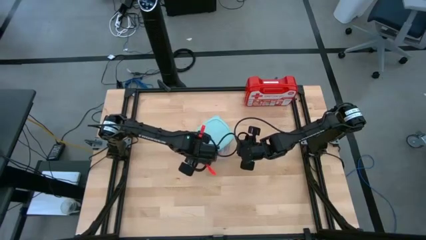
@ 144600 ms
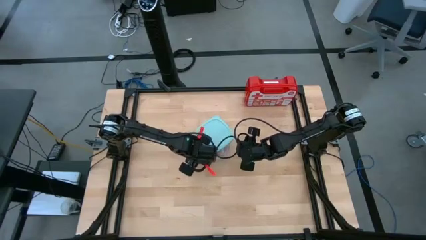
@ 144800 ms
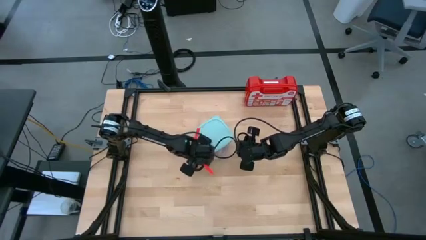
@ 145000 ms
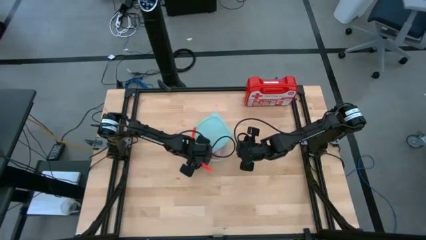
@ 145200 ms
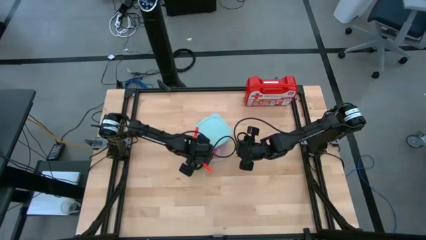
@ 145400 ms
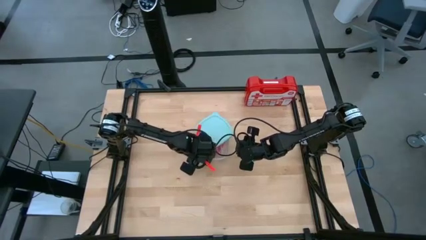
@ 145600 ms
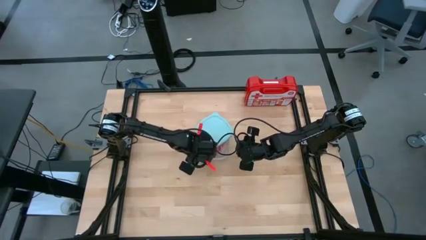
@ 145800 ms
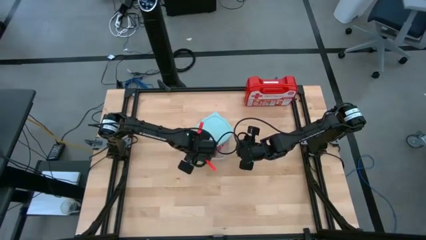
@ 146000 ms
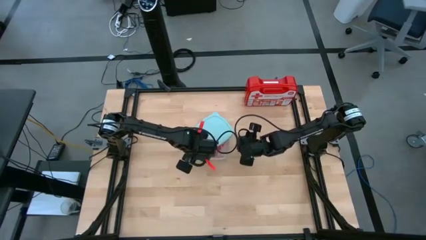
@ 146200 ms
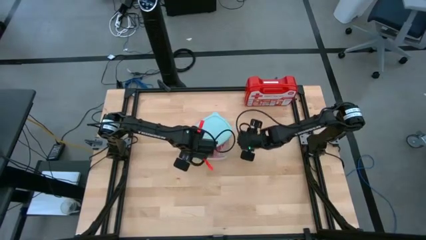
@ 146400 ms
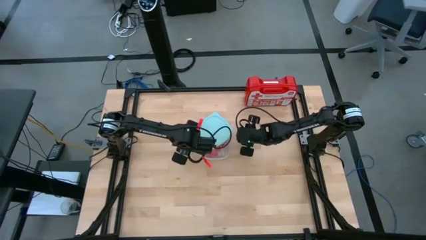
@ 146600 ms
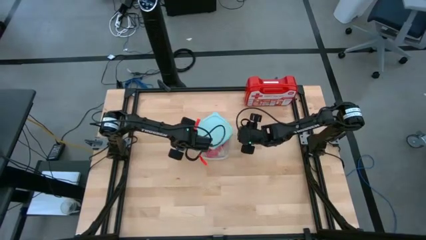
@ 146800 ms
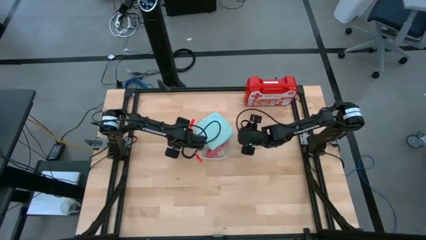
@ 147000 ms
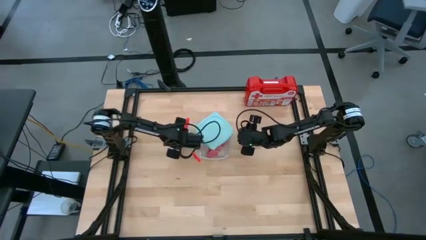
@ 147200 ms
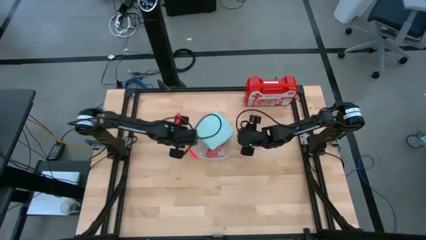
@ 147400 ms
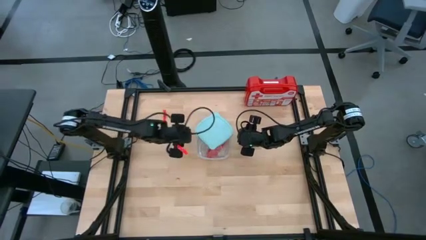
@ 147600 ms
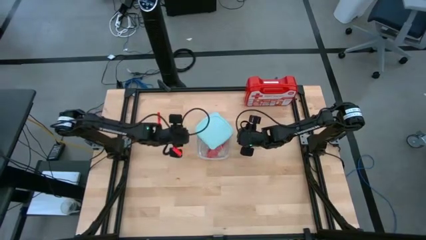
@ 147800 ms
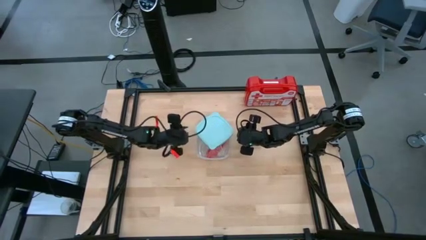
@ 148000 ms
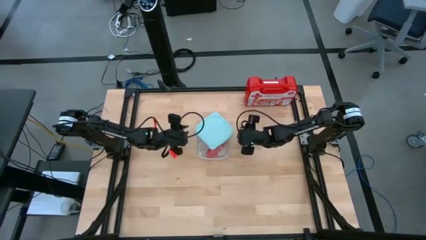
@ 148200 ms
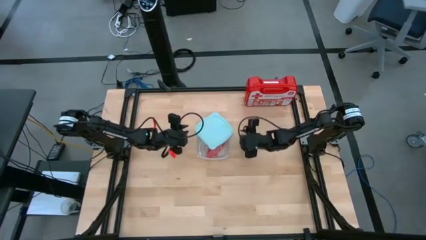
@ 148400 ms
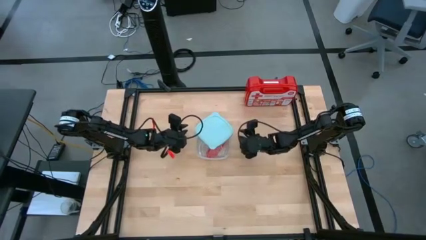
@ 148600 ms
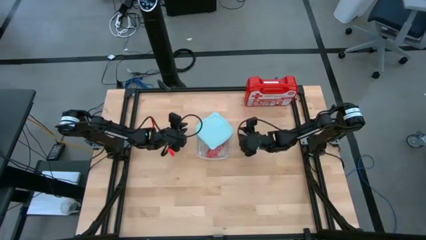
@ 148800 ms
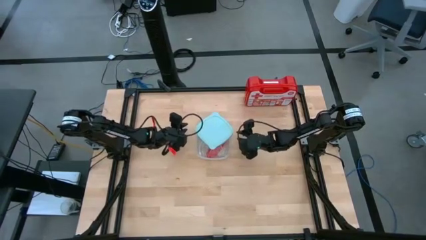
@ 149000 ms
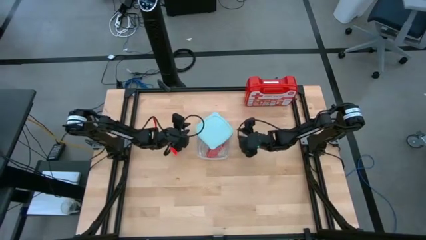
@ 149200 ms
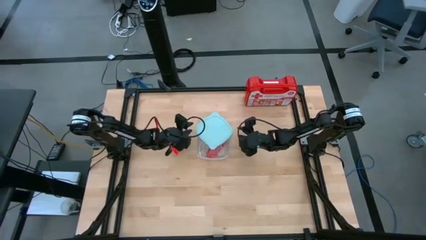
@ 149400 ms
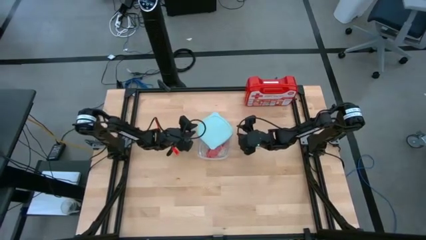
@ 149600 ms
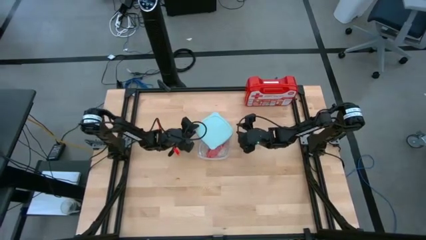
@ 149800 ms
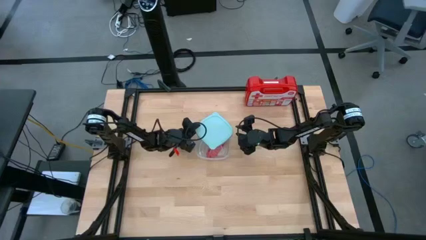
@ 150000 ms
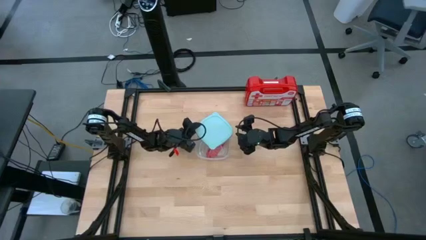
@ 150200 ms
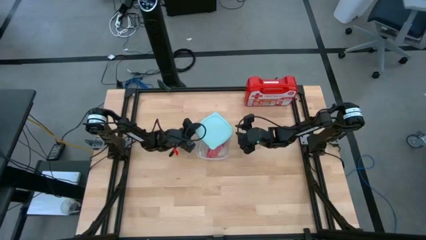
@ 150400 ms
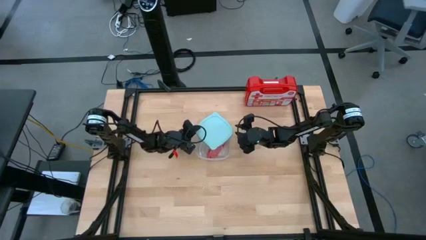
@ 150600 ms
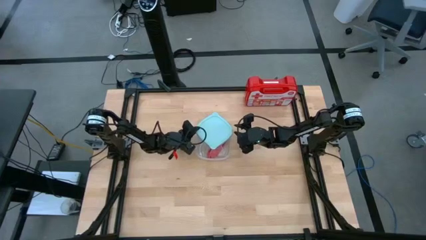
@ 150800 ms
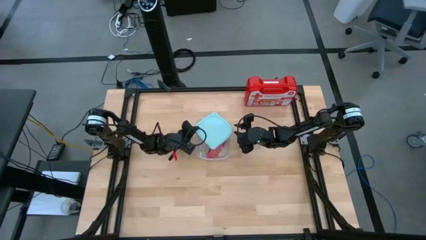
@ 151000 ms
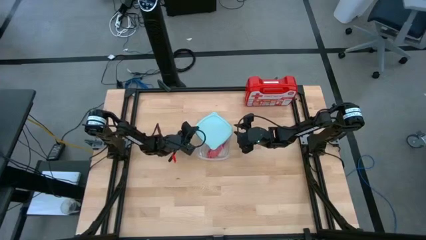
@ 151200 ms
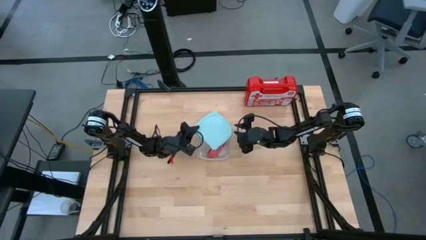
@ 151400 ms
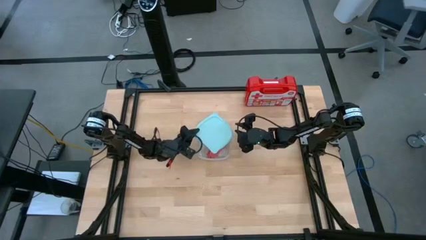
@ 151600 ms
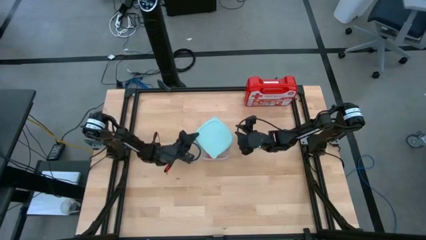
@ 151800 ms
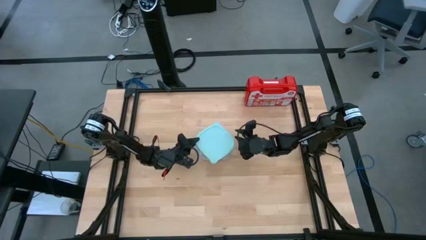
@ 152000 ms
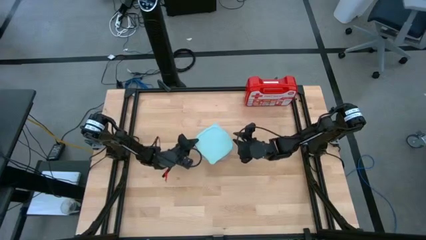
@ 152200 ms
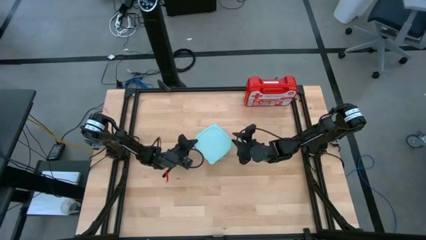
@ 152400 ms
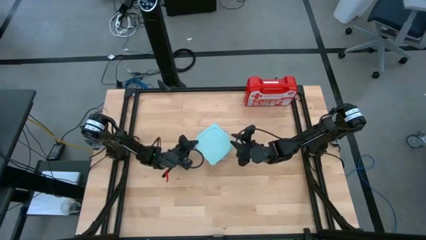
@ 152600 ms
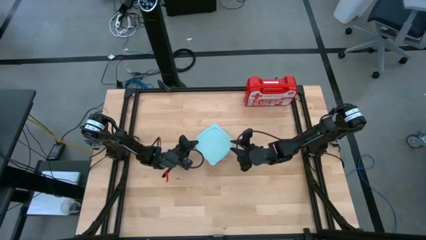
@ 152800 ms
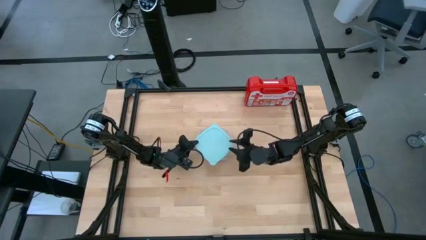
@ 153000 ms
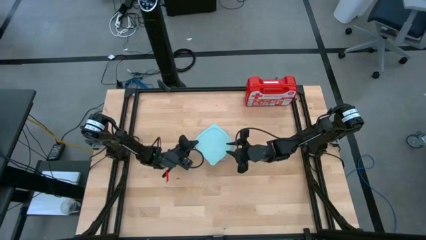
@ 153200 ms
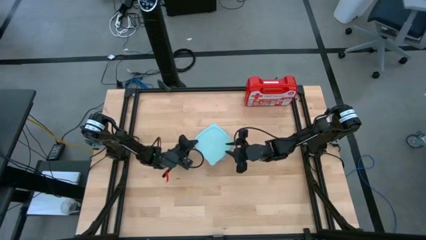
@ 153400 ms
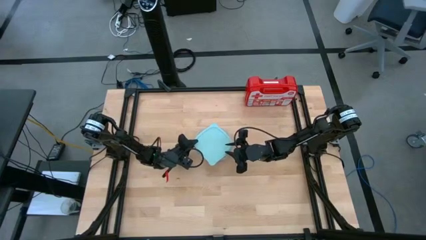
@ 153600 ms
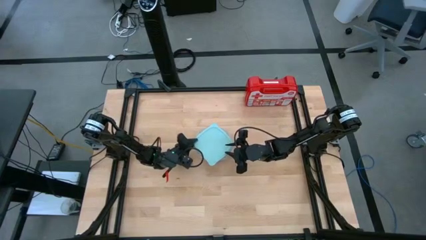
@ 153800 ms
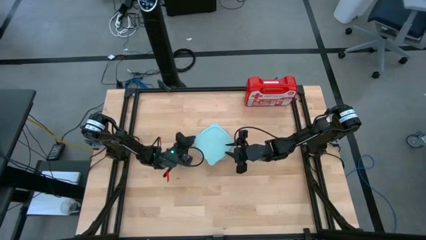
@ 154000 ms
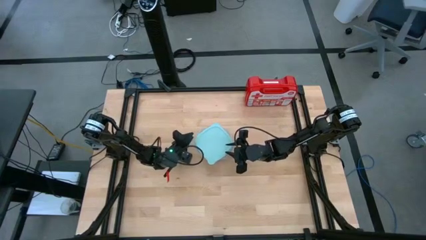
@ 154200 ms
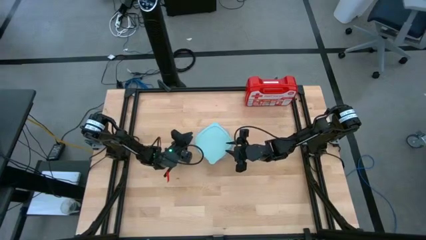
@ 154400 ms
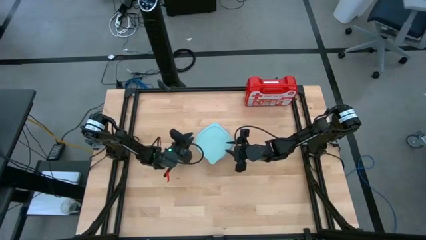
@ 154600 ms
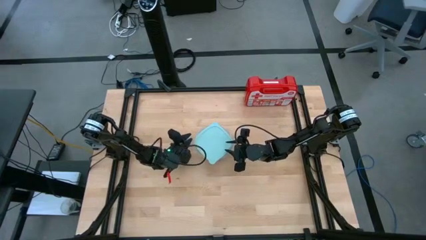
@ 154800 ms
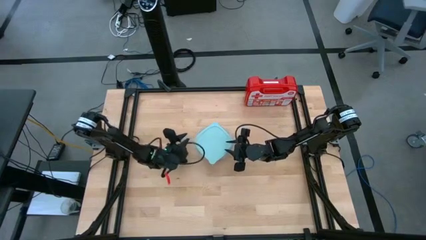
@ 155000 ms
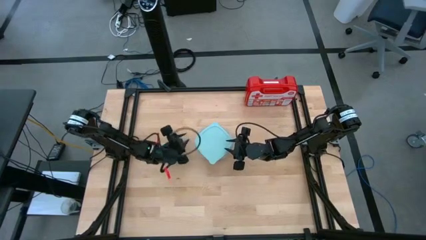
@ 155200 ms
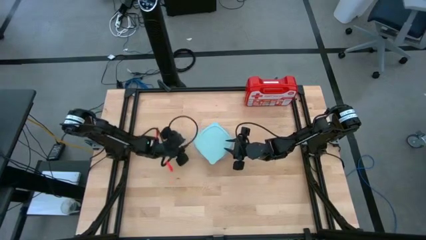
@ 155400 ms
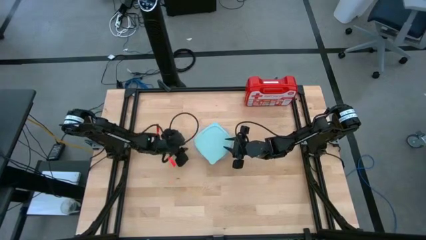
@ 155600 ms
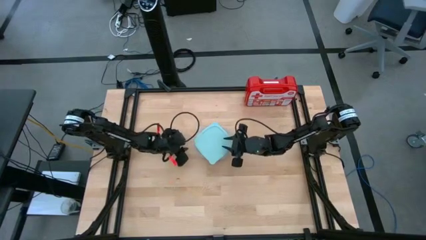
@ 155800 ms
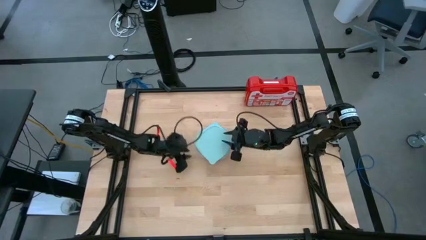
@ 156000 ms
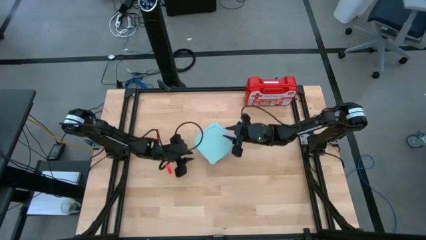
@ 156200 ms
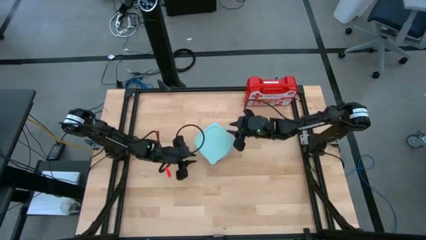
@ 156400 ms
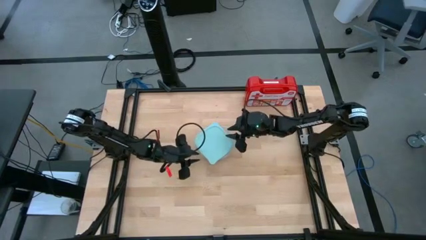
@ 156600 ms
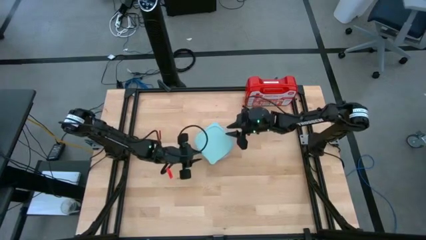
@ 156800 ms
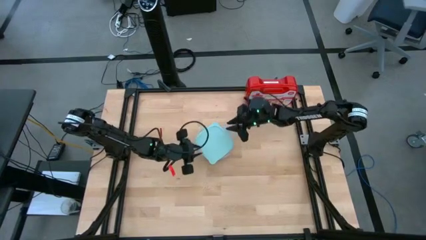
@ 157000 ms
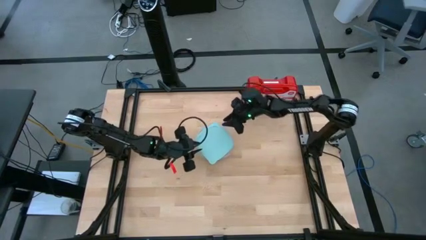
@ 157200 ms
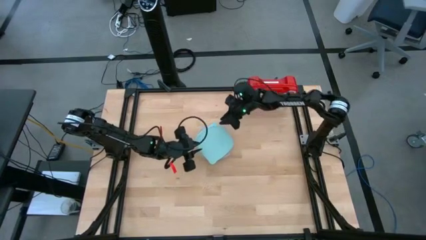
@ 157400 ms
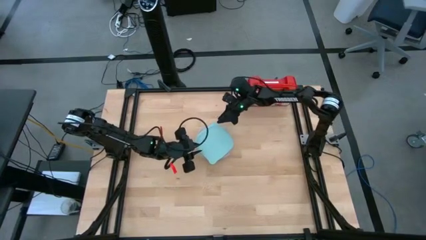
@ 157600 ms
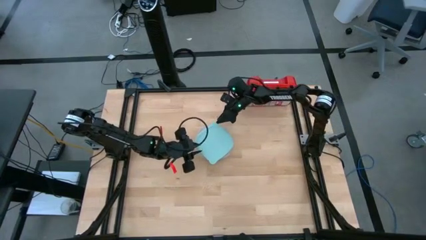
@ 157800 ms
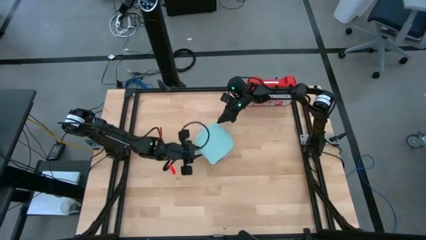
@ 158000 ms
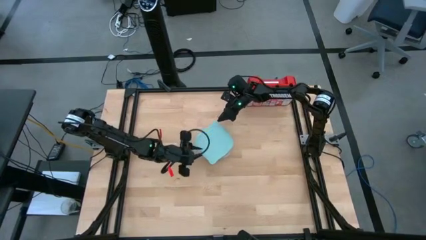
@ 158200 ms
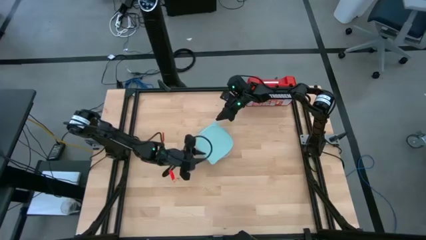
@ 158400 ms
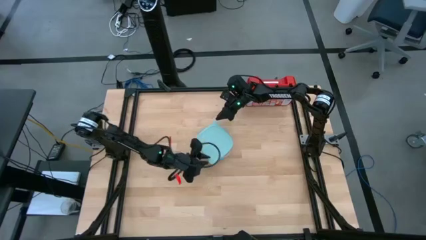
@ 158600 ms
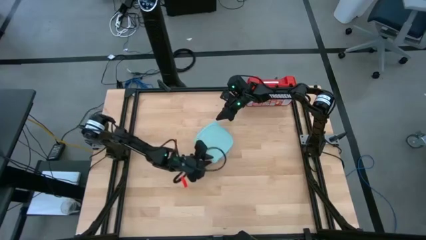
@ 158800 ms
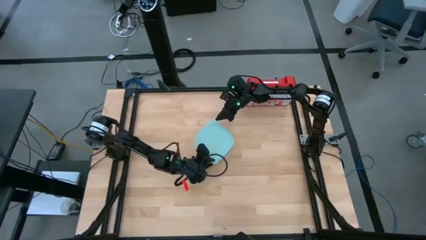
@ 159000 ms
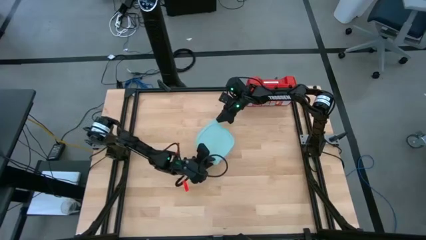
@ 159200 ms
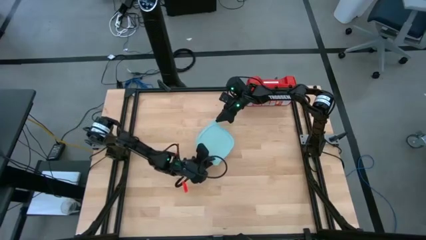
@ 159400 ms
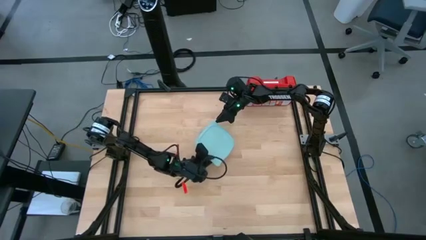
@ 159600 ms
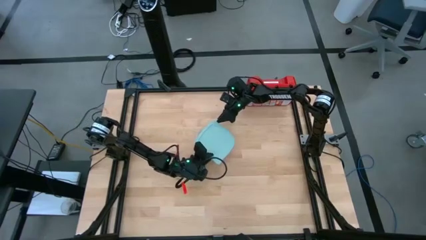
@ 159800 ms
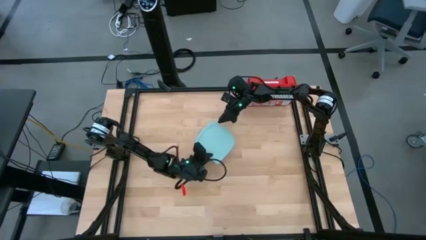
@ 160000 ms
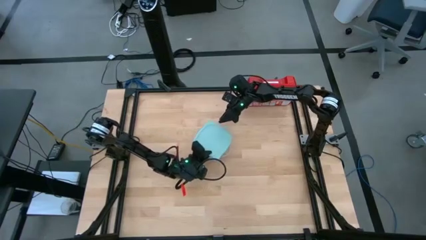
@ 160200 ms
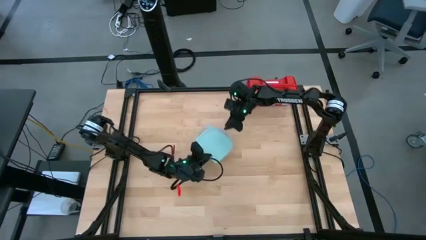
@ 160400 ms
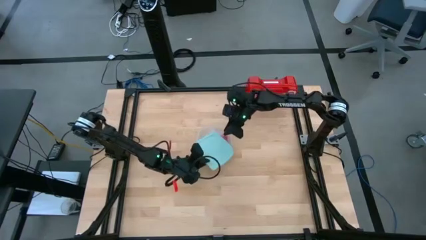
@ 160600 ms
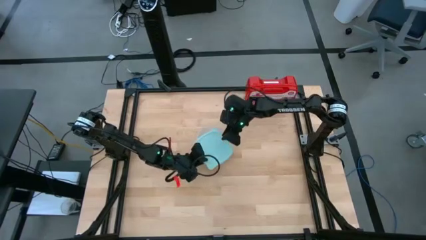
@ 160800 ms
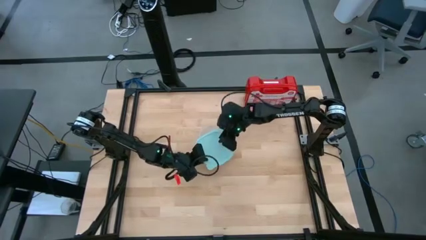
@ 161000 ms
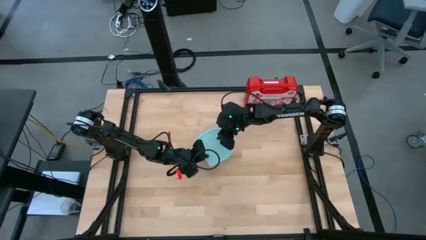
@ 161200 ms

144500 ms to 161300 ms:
Task: Roll bandage
Close the plastic container
